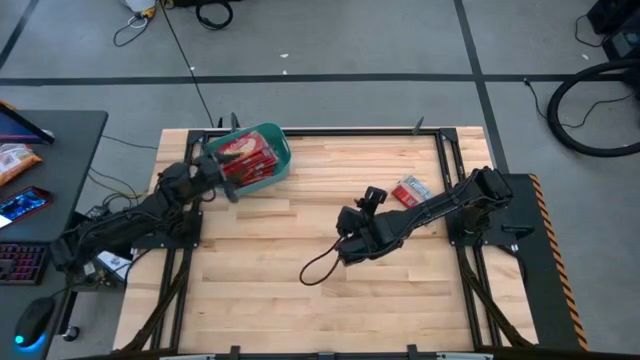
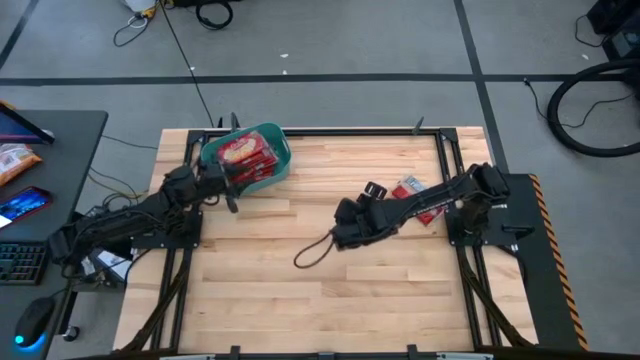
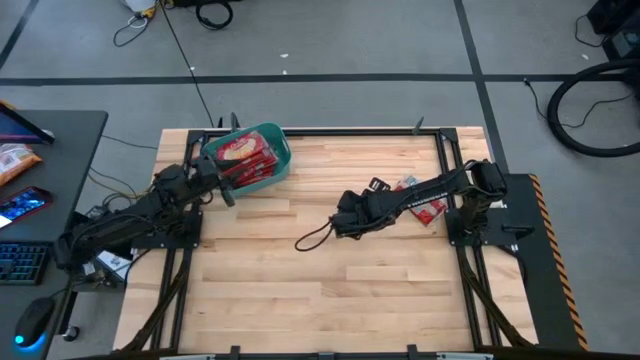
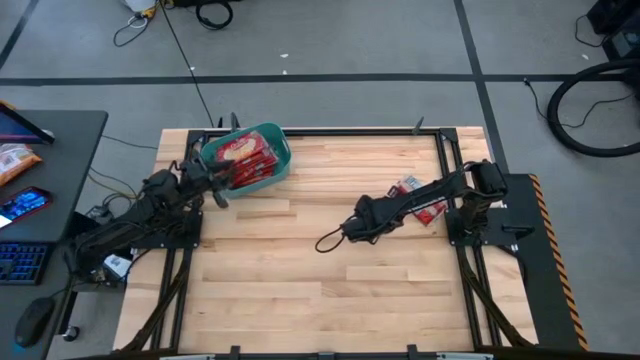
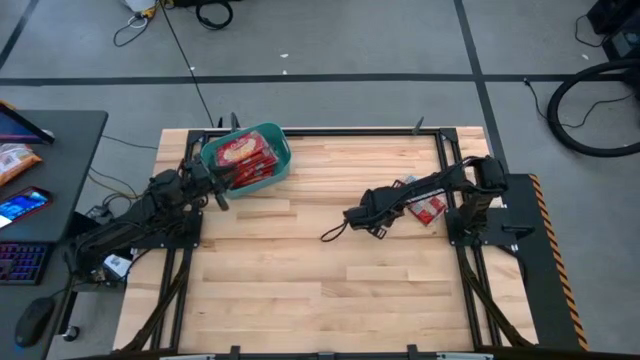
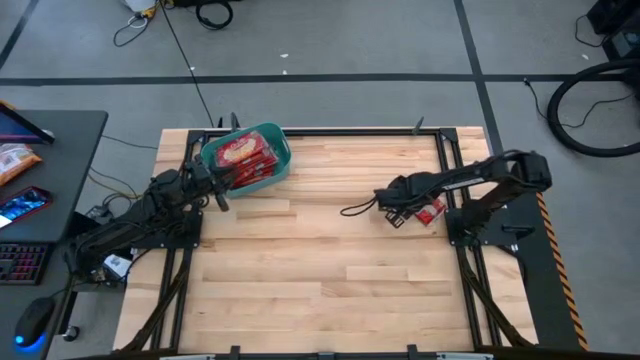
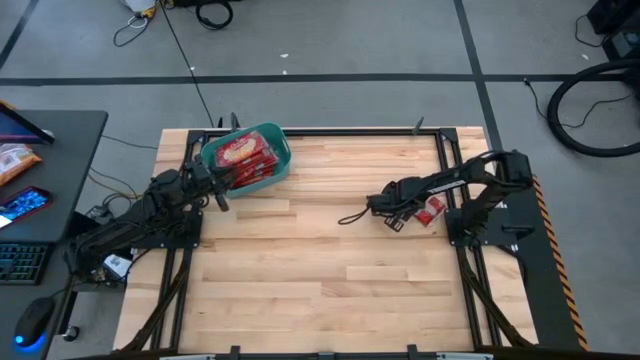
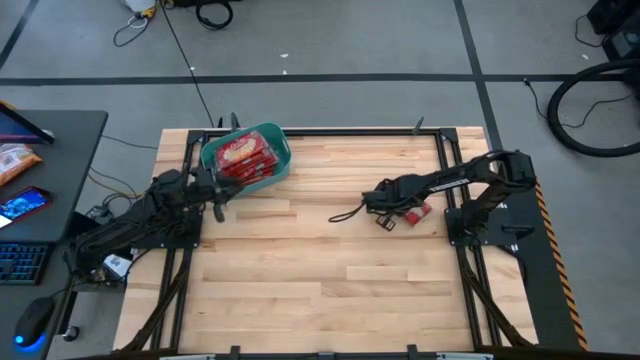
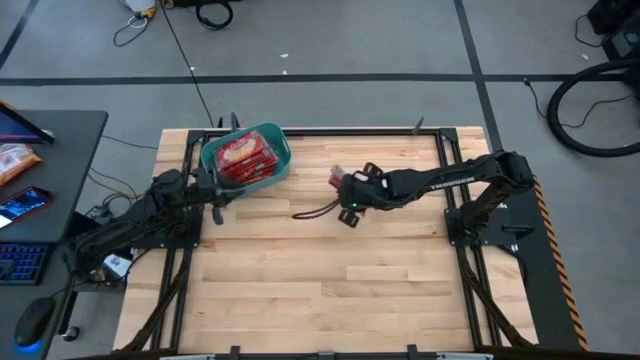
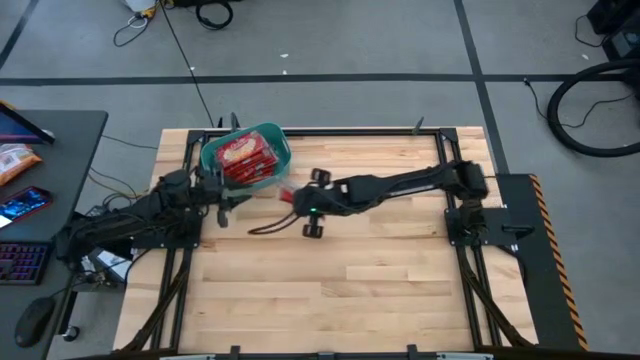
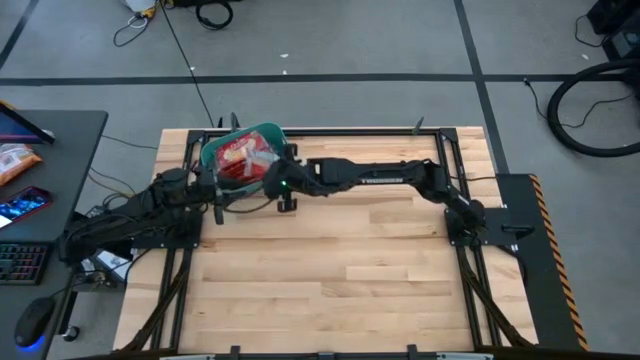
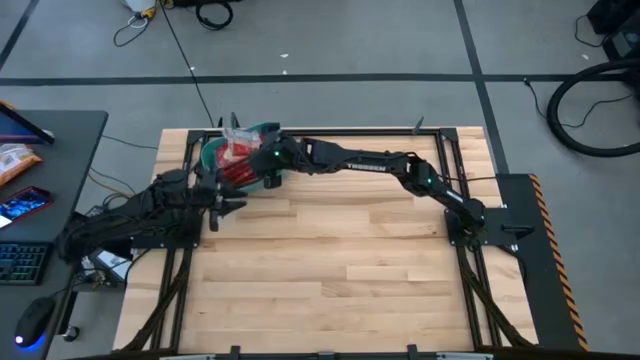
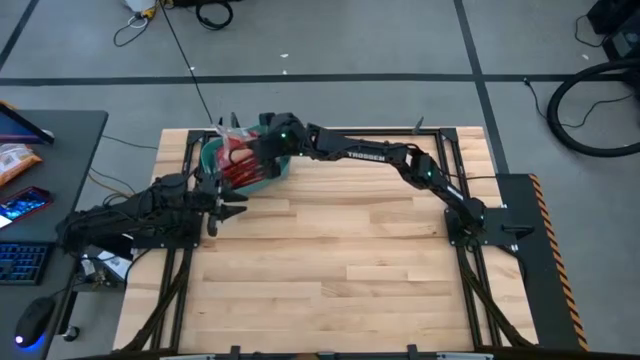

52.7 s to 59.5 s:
Task: Sort popcorn bags into baskets
Put the popcorn bag into the green bin

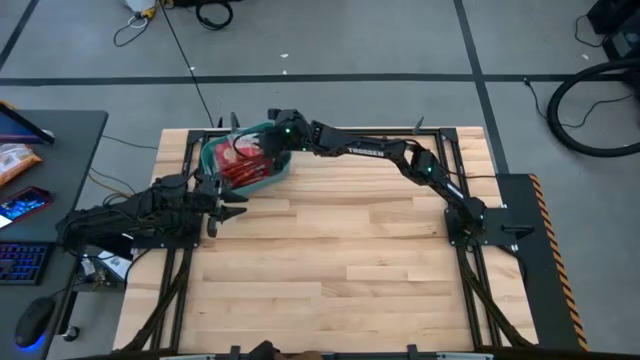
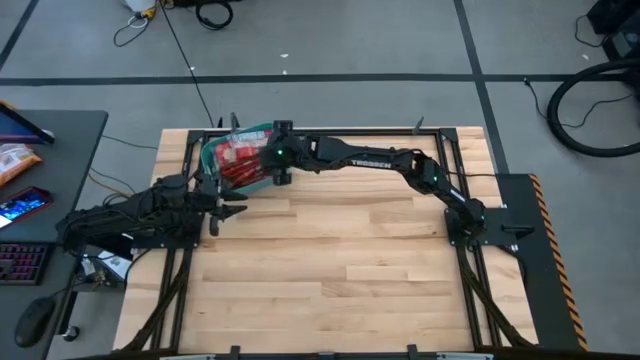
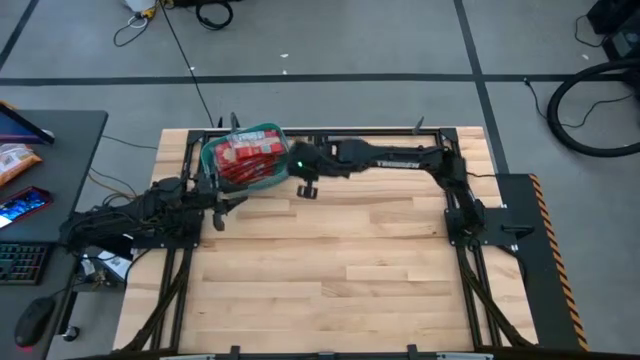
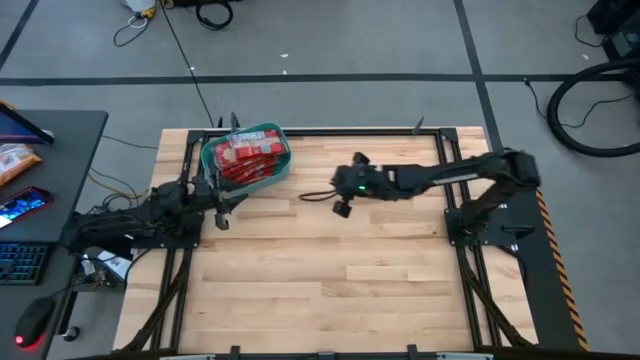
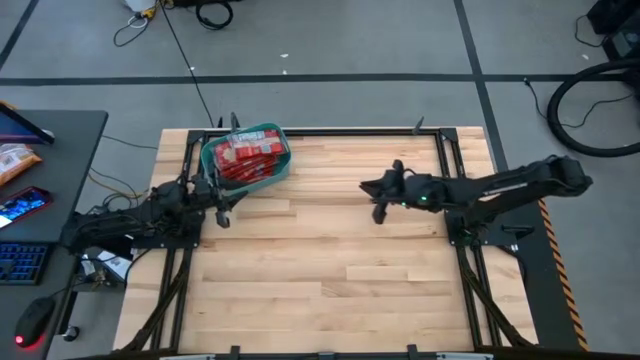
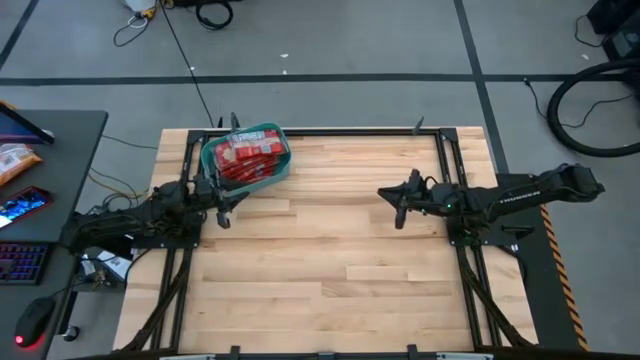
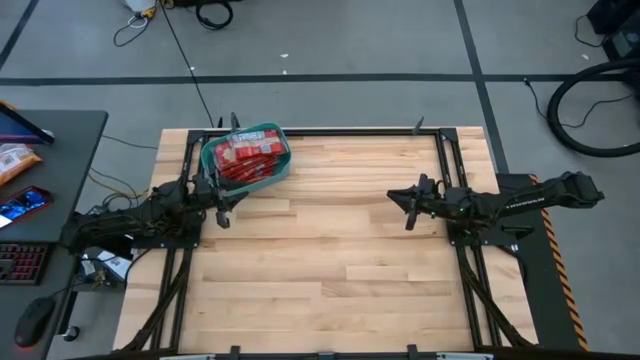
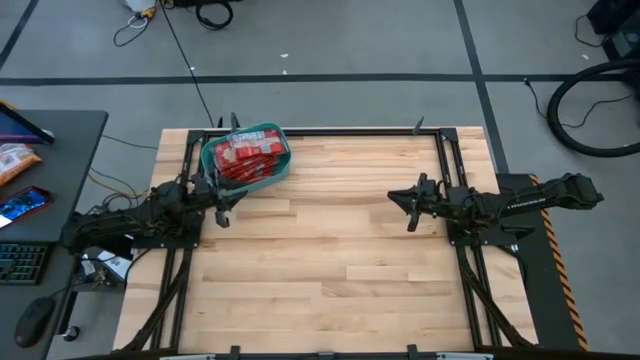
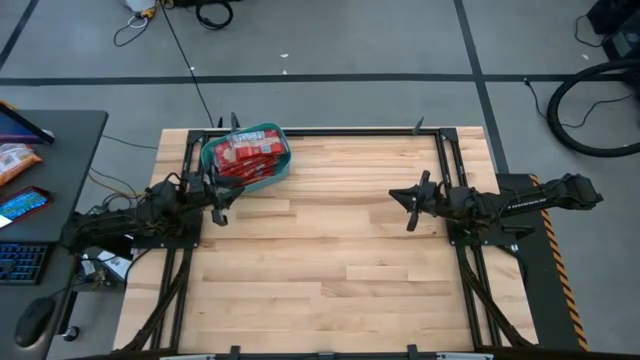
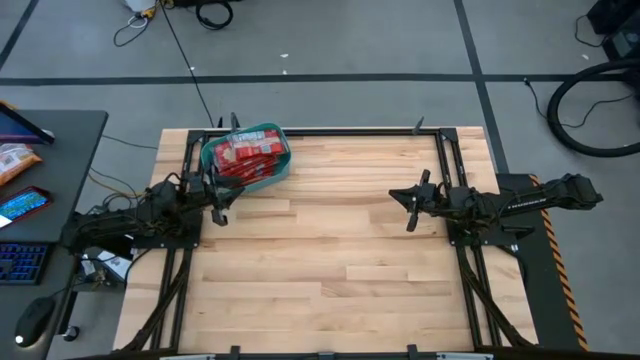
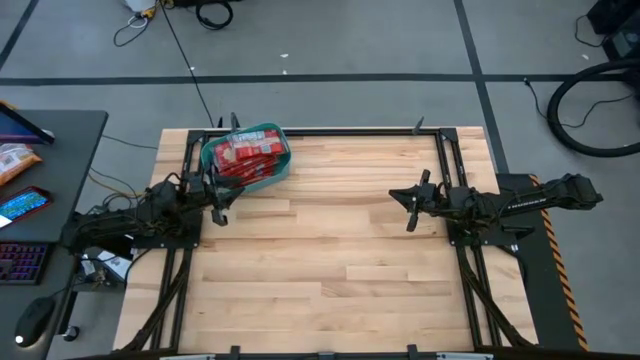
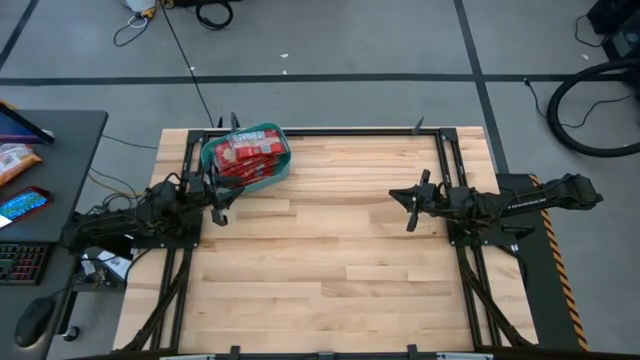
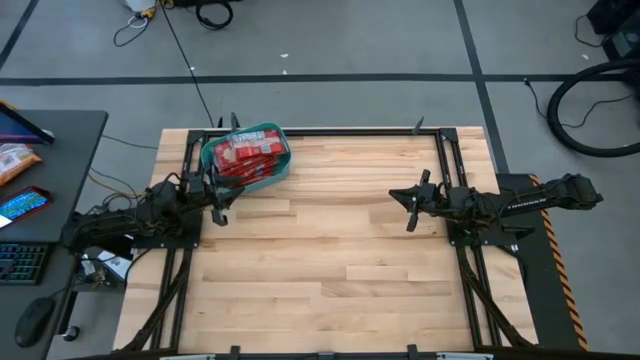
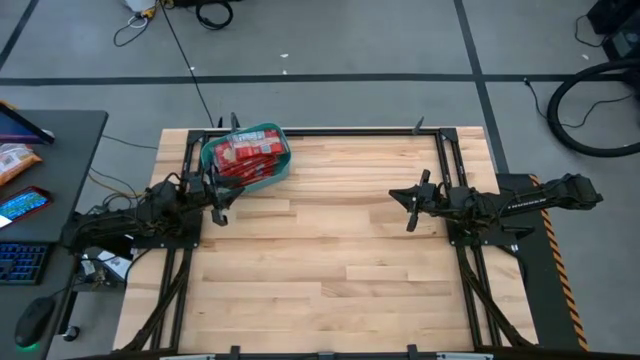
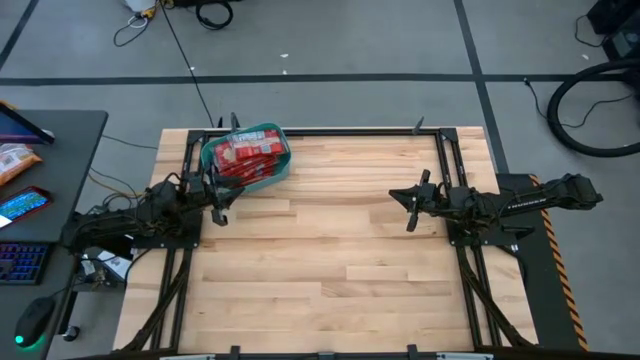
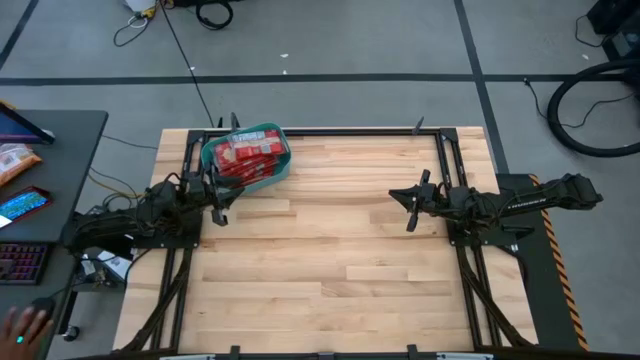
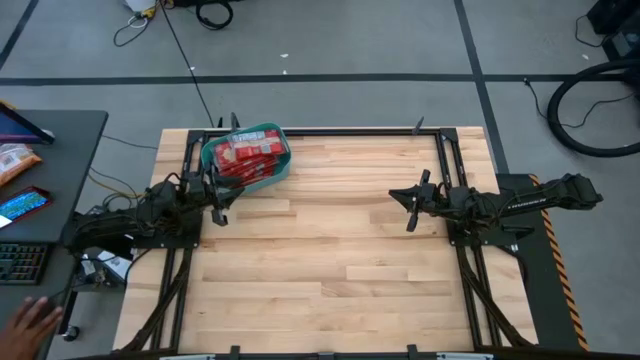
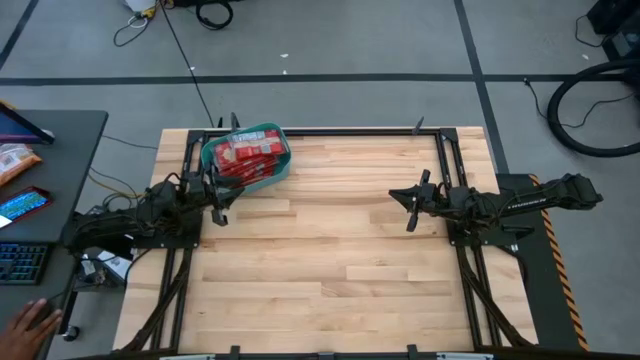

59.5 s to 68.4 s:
Return to Home Position

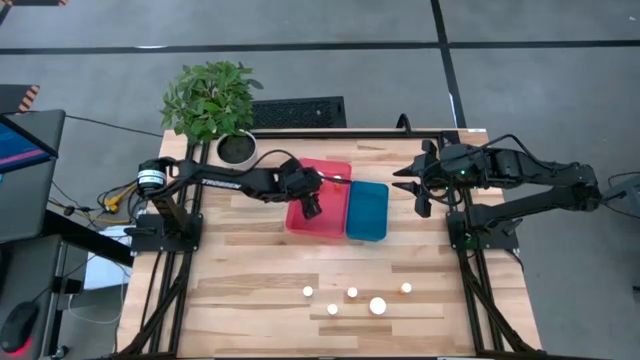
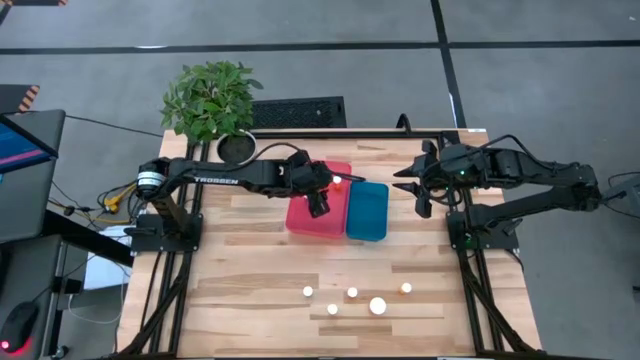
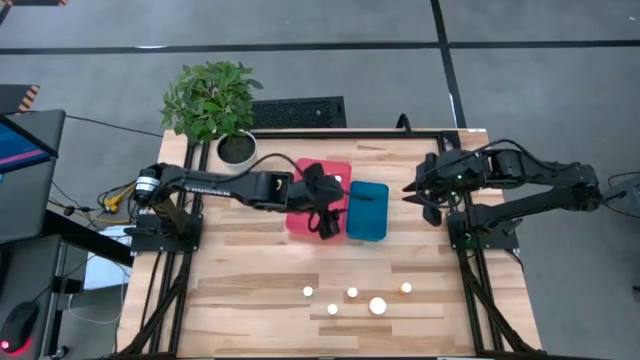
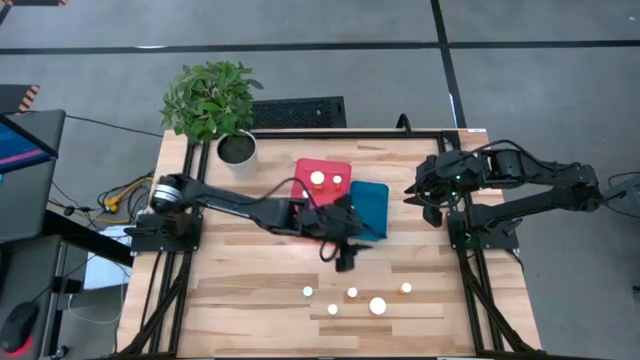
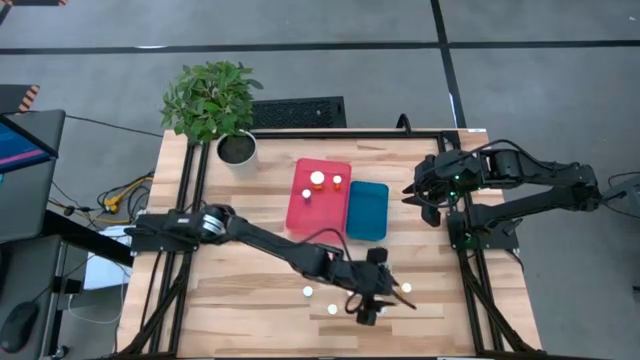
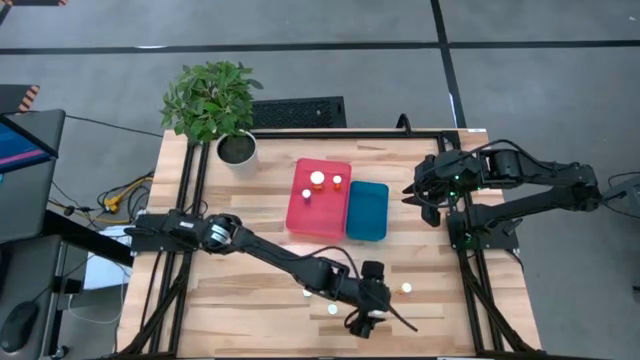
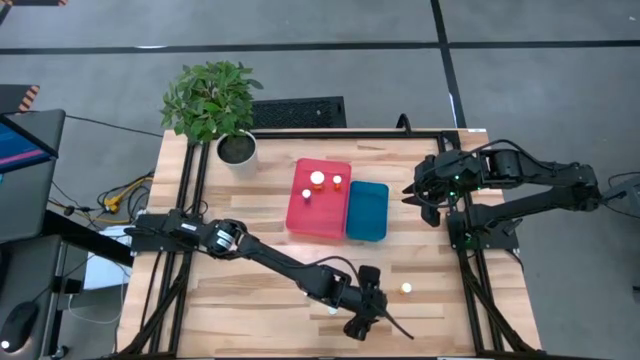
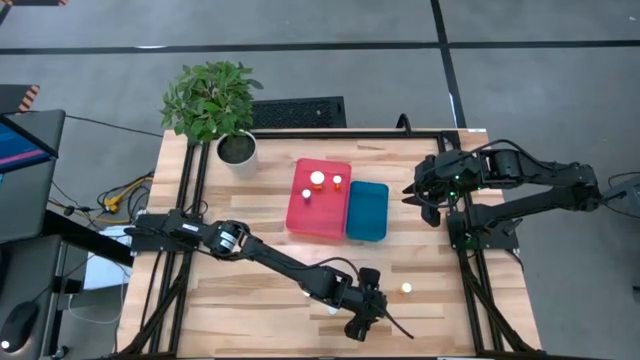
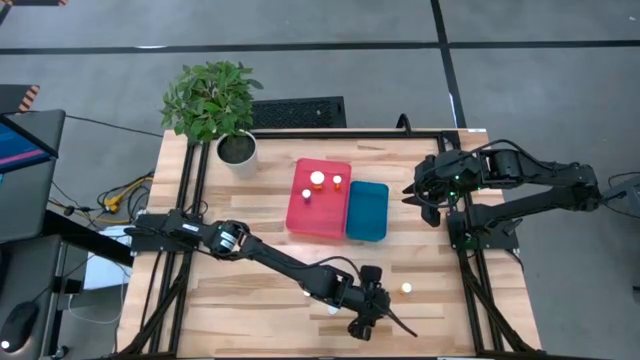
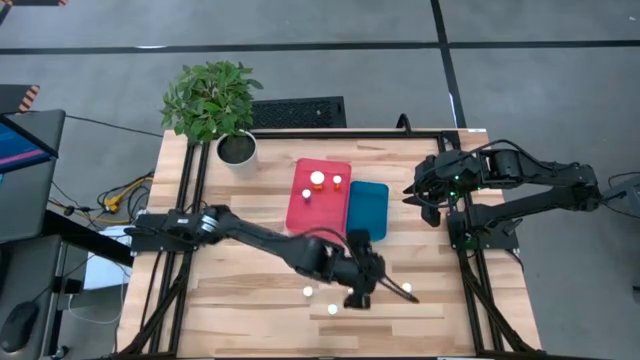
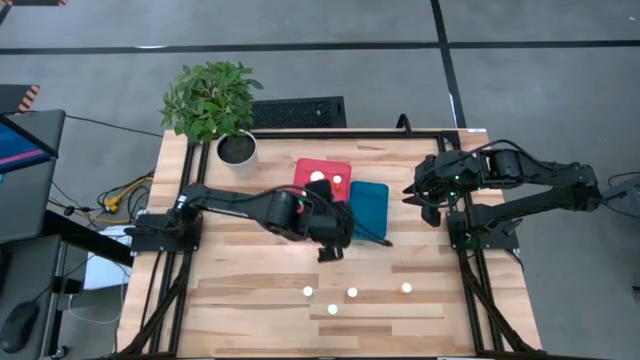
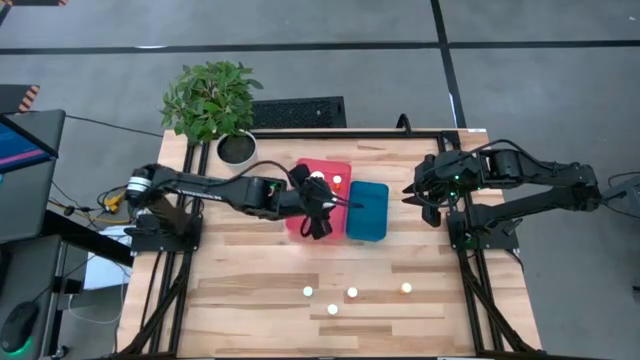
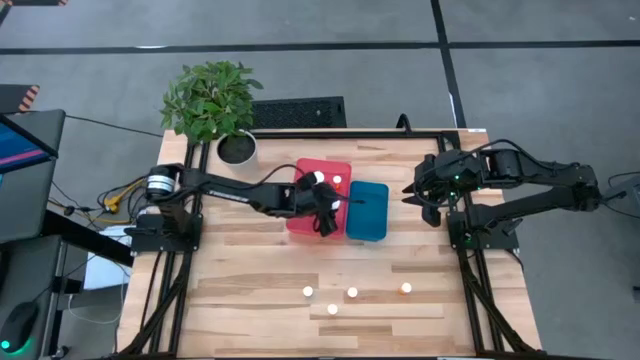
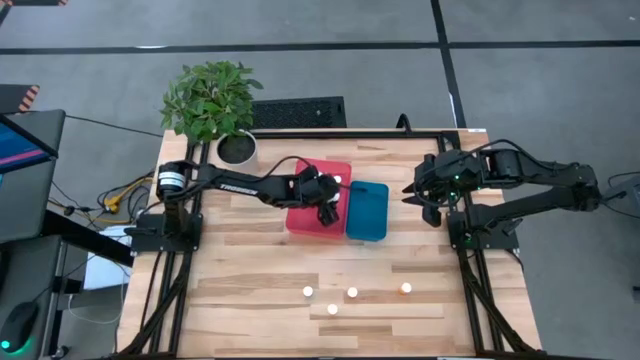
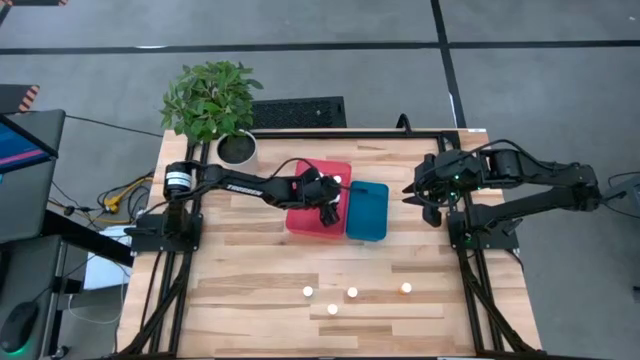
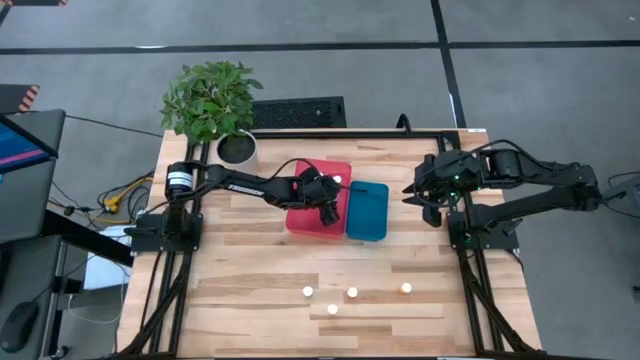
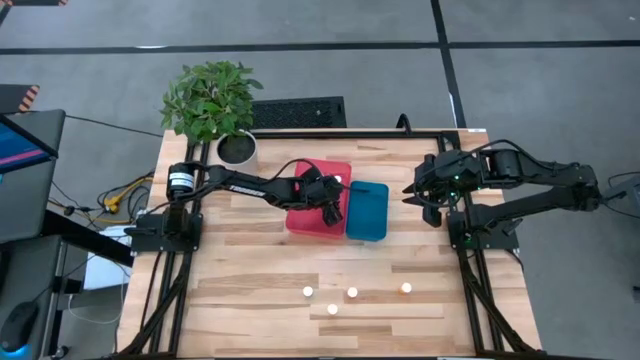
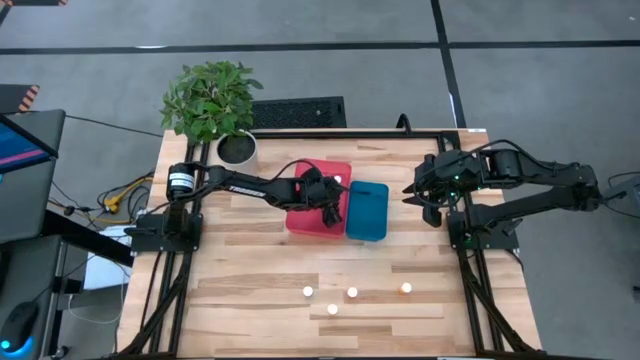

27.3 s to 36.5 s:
Task: Pick and place medicine bottles into bin by pill shape (circle, oval)
Put the big orange pill bottle into the red bin
